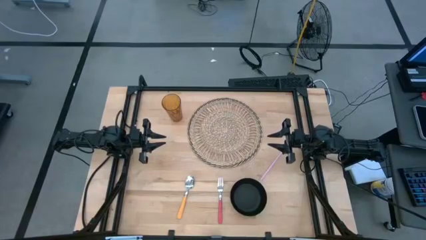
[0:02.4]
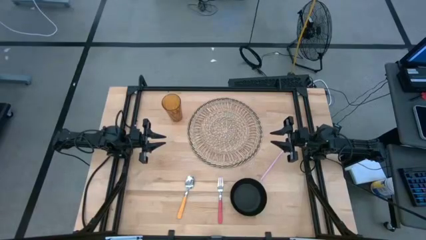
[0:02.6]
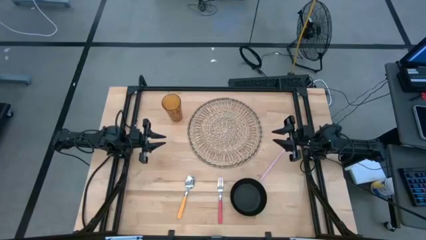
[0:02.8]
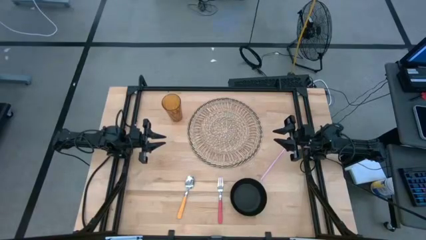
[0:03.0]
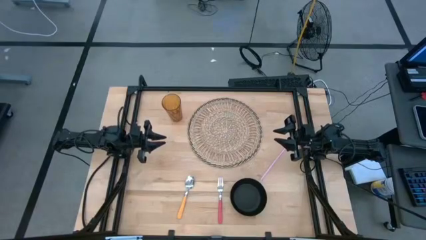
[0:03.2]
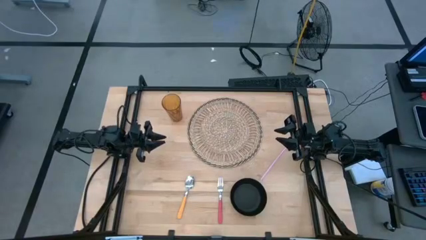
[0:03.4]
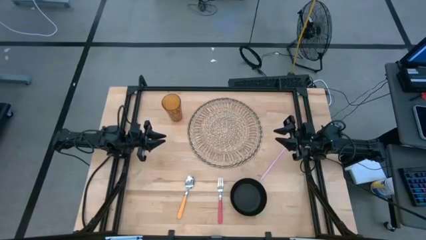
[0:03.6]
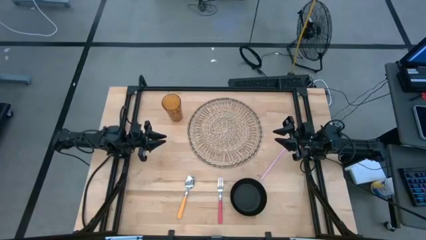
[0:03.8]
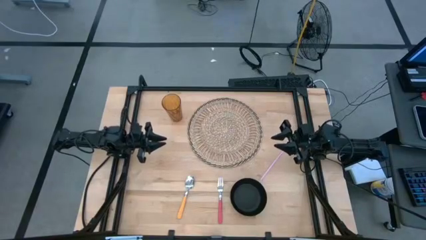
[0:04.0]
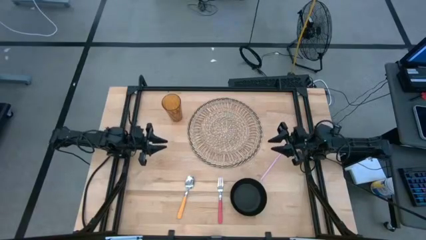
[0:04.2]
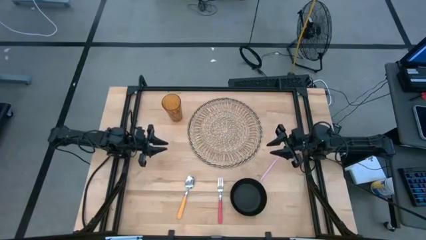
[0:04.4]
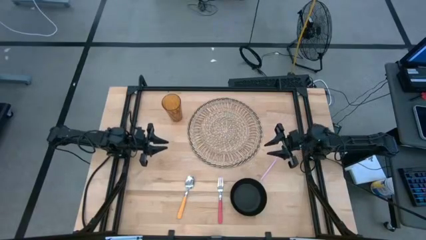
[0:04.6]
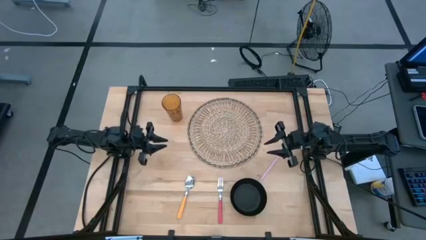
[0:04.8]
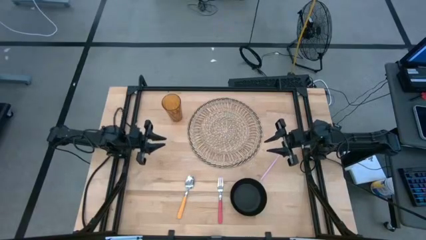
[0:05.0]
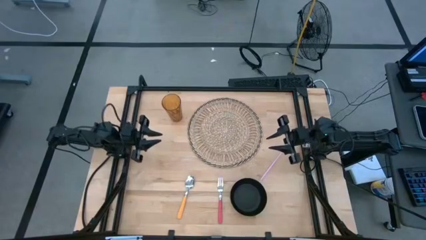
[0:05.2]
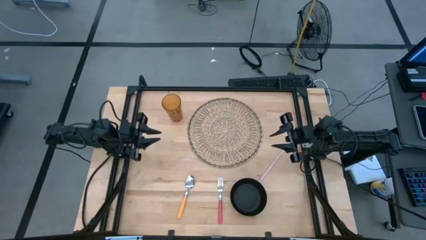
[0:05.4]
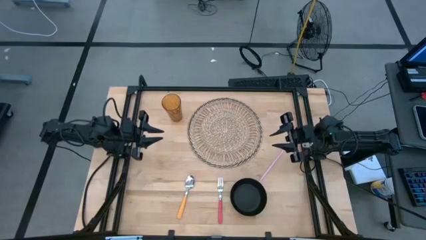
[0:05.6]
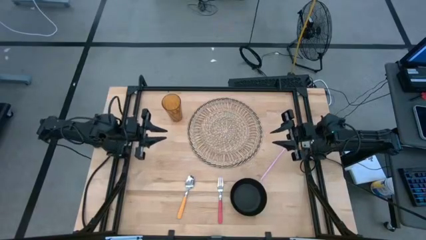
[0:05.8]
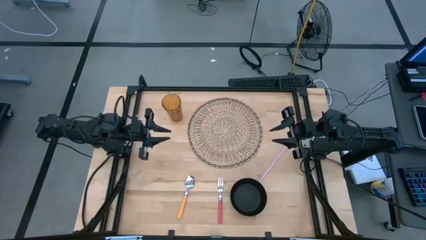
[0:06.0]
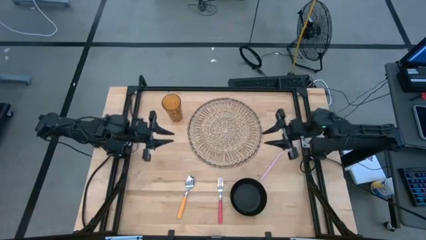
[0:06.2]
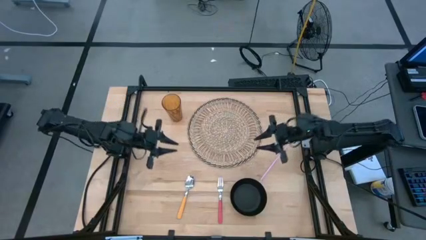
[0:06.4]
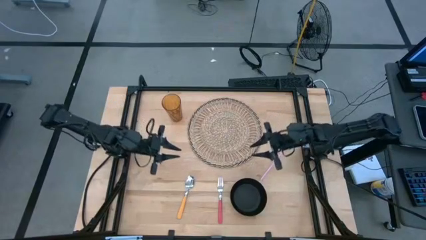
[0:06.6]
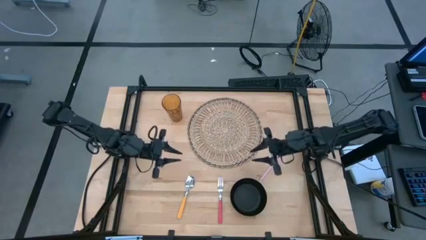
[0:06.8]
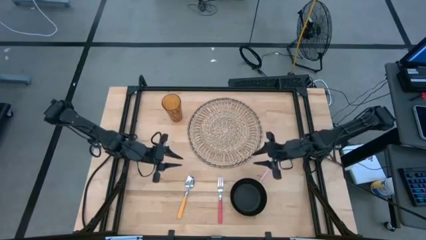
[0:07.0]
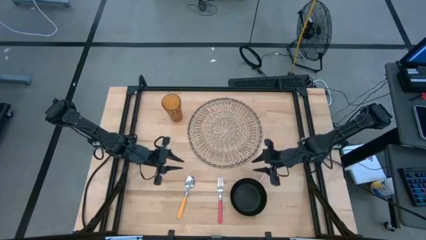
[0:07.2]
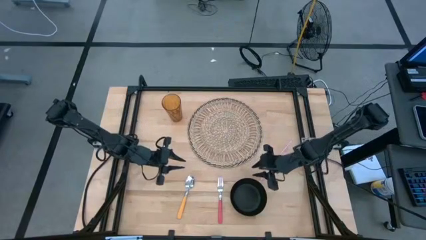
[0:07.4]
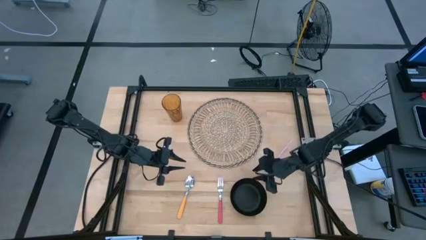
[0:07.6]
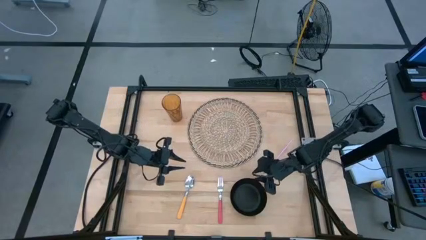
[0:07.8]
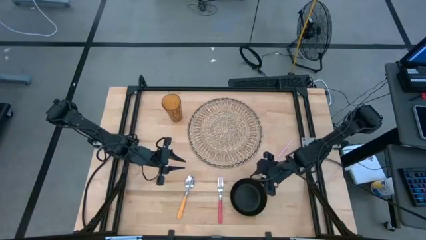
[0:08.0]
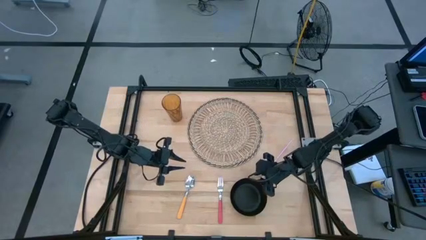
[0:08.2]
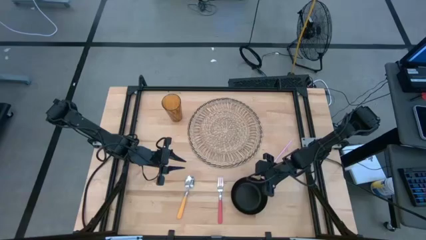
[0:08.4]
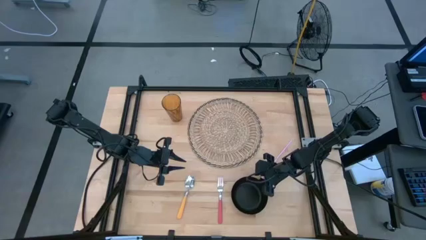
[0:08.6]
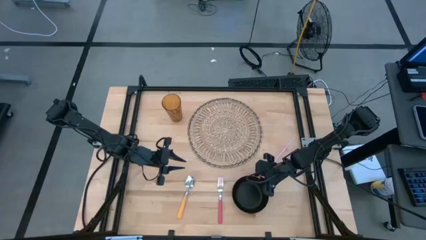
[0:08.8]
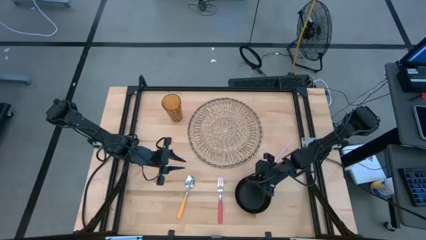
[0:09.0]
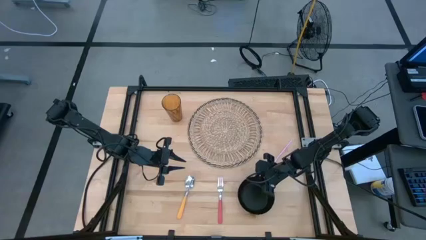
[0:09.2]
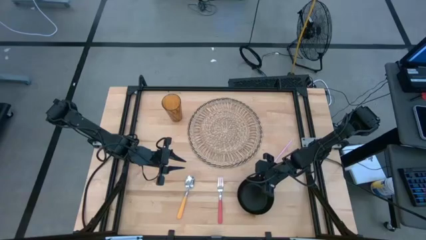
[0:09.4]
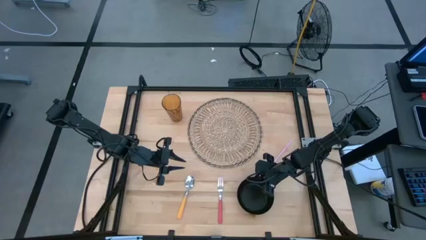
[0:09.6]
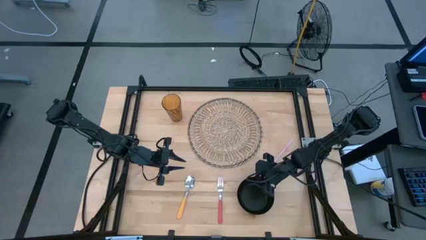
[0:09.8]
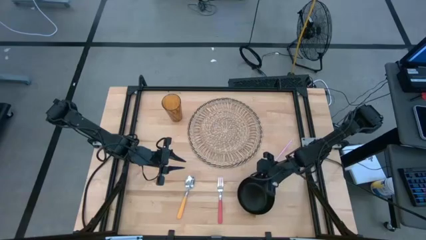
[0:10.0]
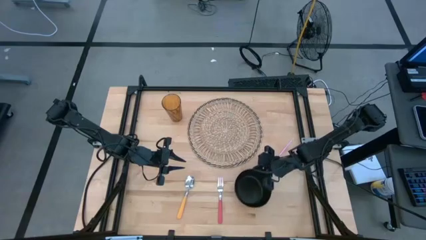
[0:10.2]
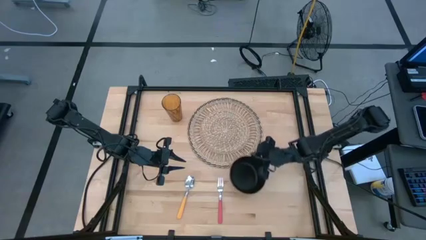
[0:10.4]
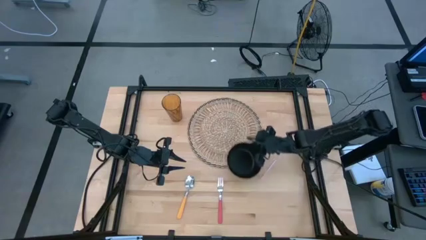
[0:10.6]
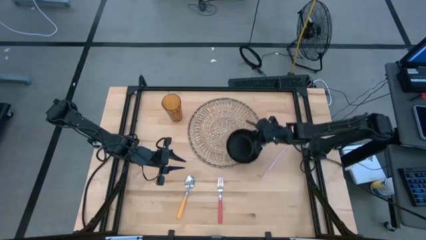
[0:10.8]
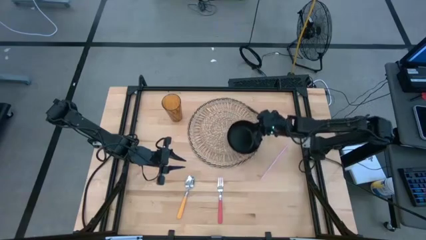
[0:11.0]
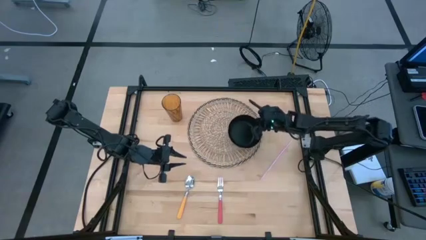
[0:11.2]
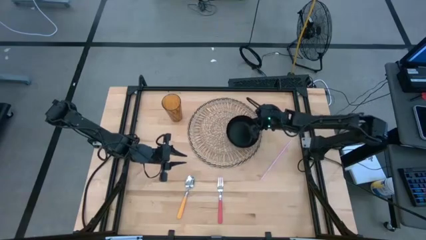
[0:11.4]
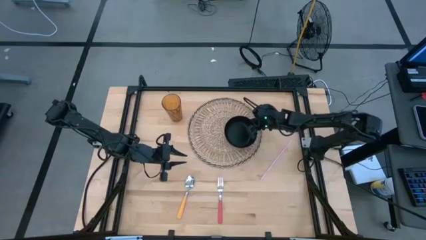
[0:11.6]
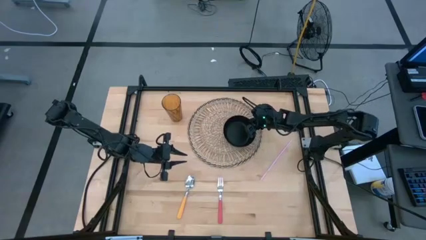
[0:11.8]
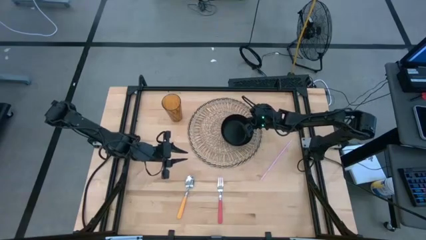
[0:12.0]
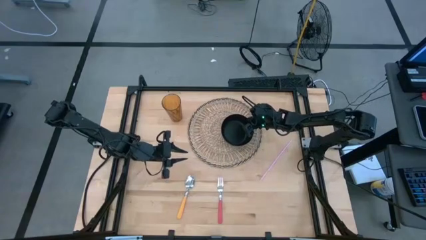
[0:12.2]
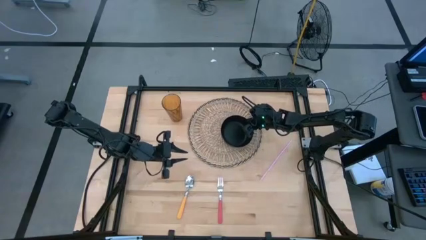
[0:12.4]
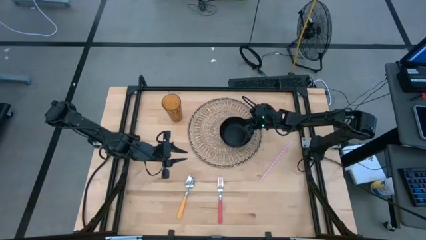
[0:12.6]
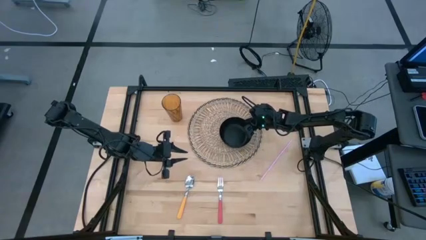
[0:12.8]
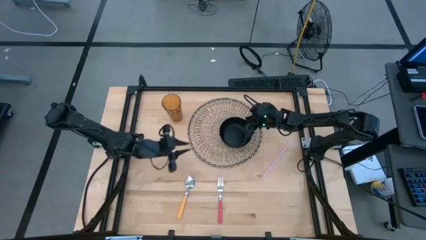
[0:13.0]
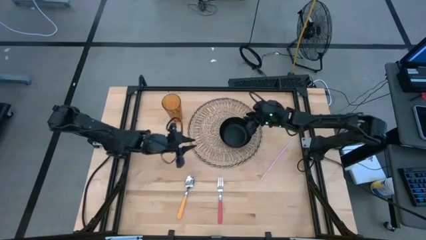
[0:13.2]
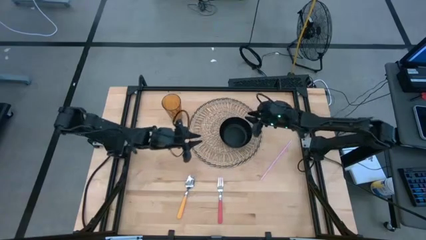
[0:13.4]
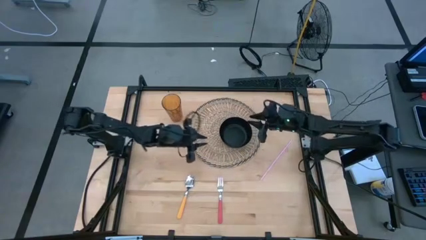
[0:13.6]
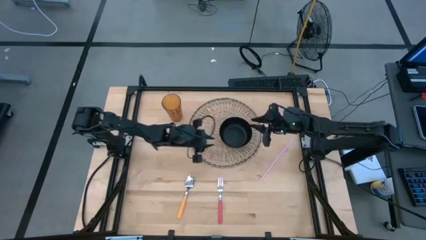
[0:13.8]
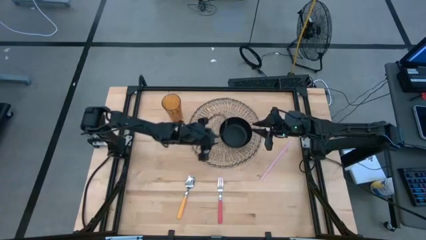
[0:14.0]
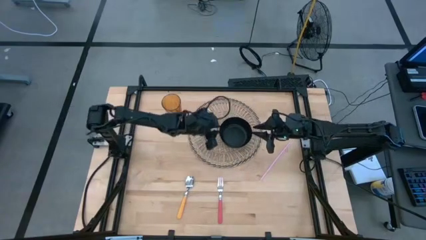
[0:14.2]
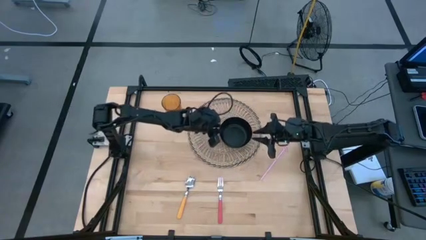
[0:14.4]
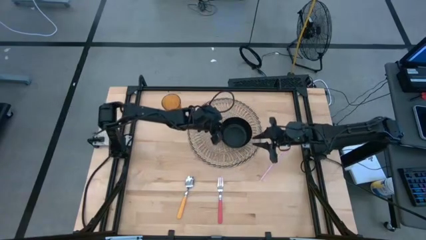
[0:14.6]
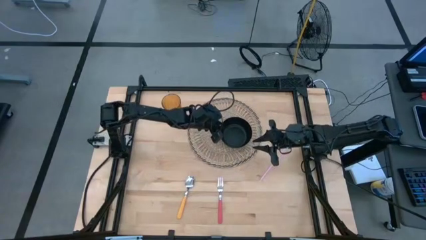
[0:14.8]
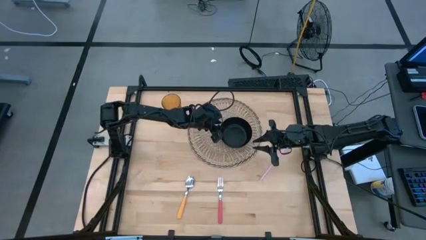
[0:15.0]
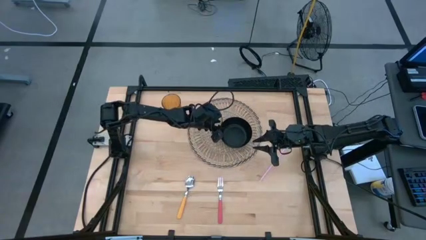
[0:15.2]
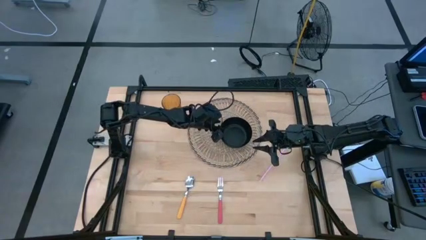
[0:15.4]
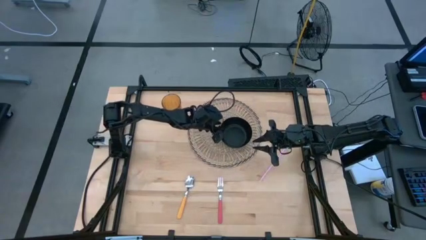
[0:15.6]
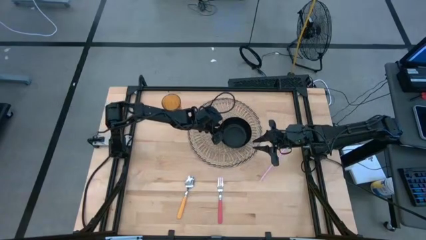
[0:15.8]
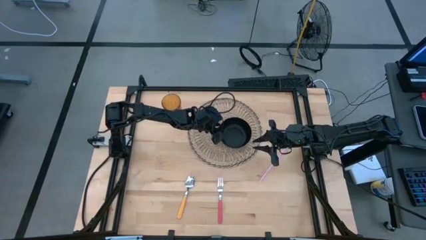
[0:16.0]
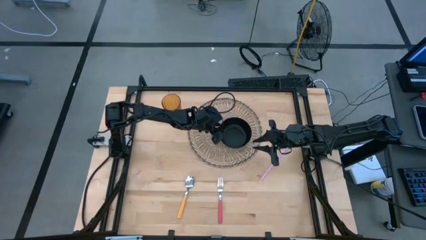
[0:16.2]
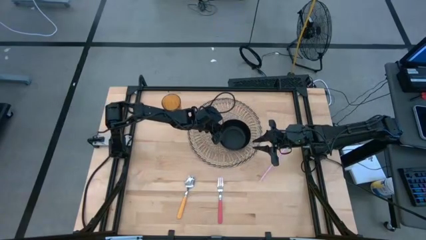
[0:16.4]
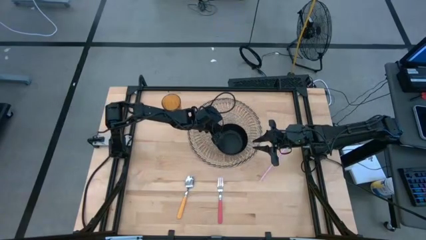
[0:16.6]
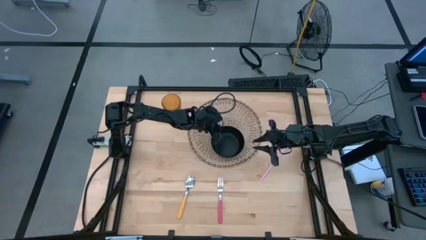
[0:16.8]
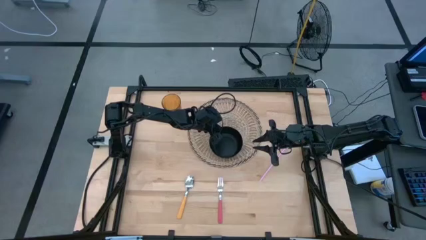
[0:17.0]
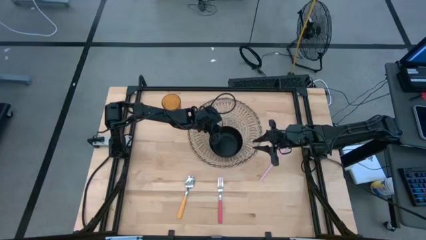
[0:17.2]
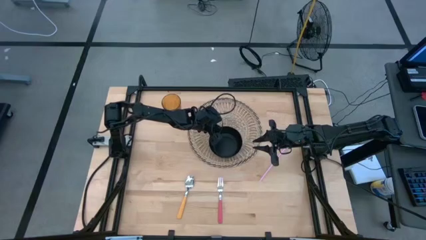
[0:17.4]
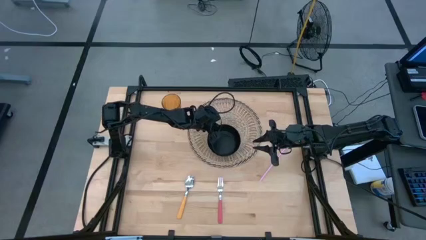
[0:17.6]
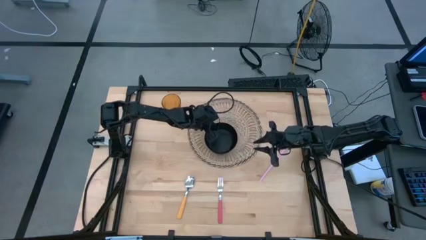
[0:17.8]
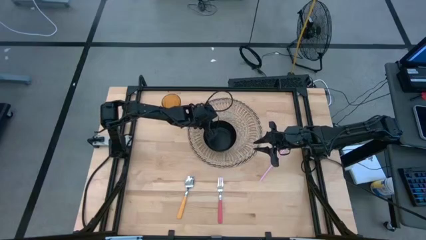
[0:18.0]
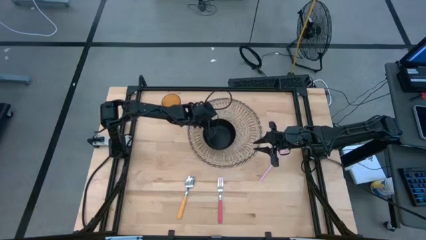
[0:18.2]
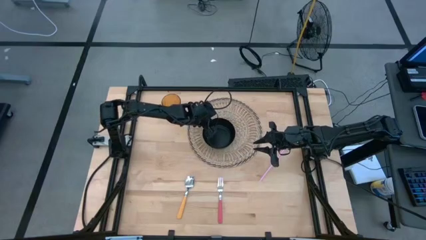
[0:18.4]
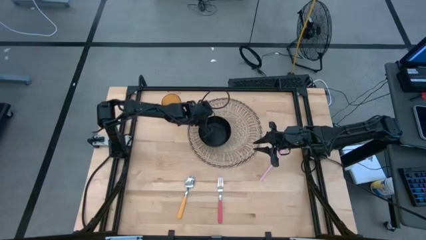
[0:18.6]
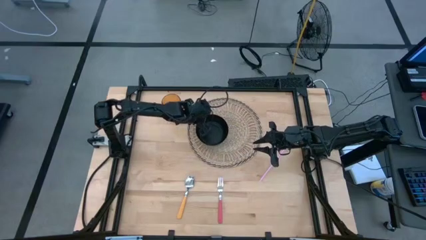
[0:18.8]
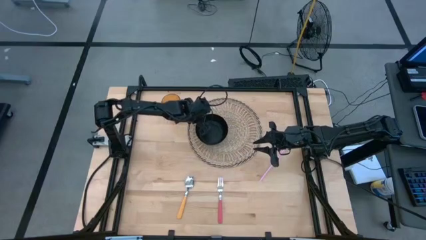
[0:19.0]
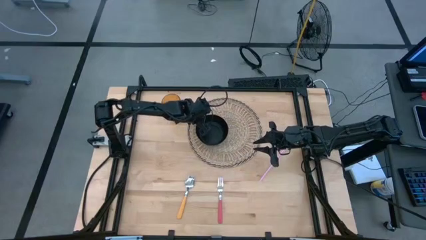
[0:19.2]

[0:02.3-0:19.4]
Task: Pick & Place Utensil
Put the black bowl on the brown mat
